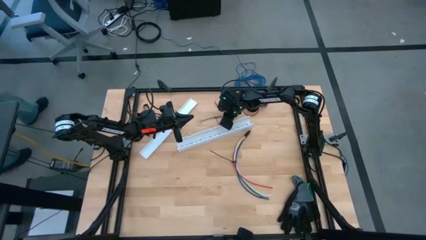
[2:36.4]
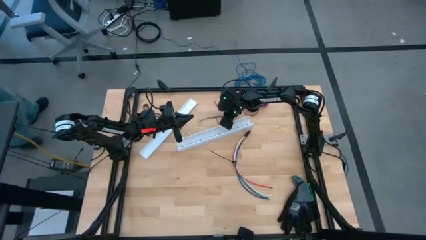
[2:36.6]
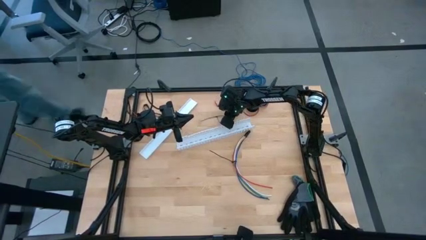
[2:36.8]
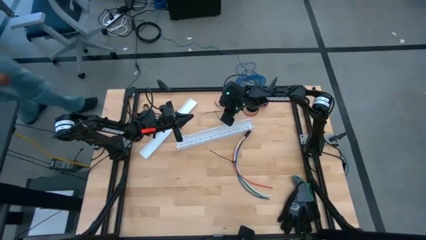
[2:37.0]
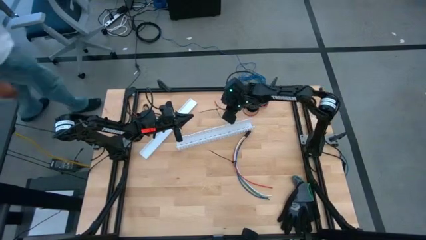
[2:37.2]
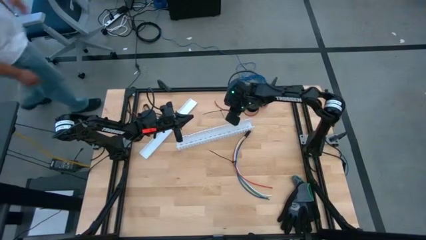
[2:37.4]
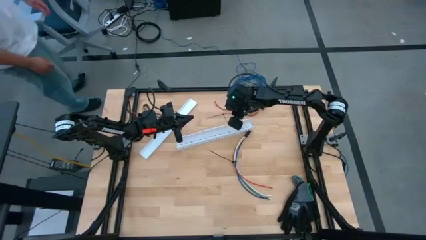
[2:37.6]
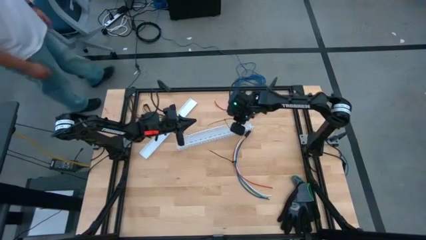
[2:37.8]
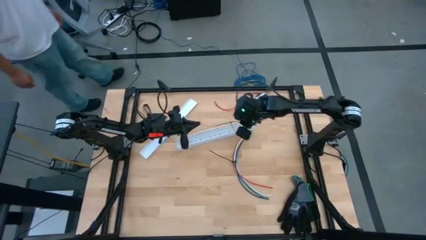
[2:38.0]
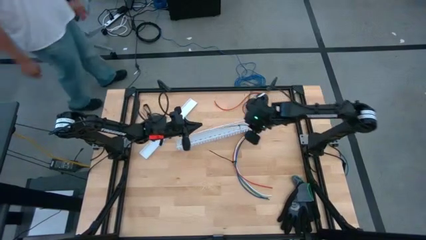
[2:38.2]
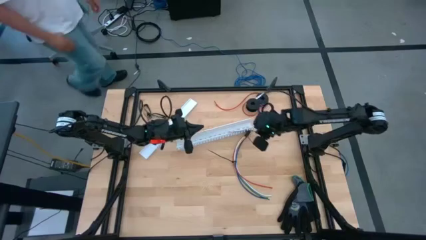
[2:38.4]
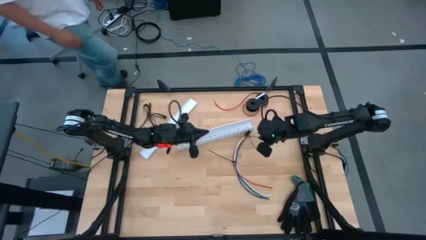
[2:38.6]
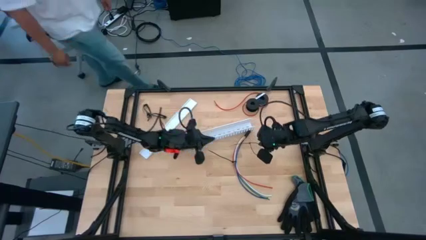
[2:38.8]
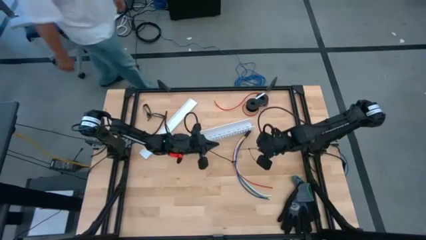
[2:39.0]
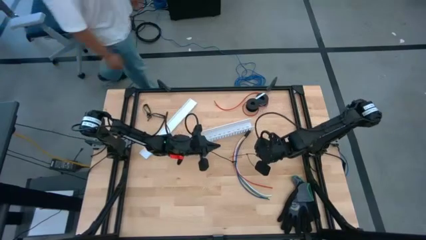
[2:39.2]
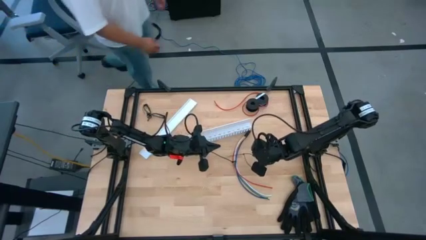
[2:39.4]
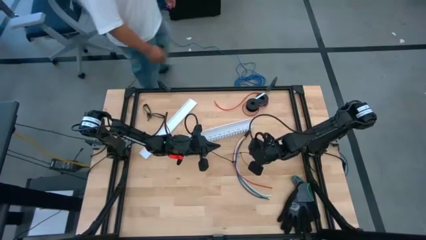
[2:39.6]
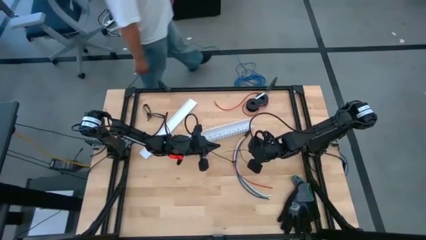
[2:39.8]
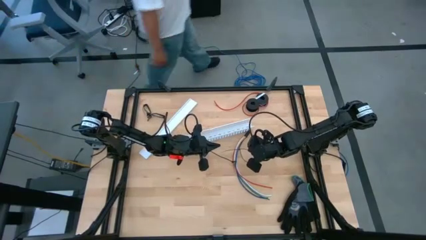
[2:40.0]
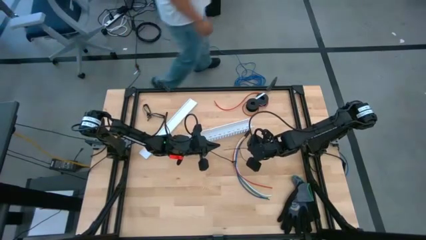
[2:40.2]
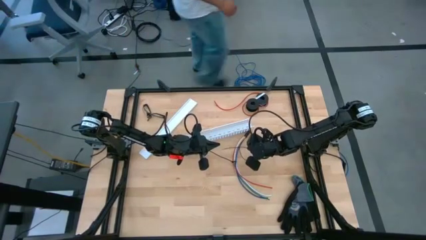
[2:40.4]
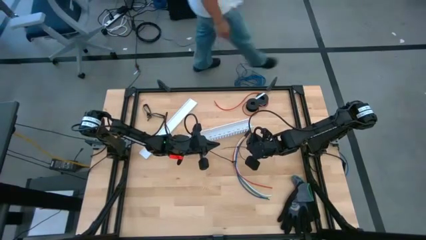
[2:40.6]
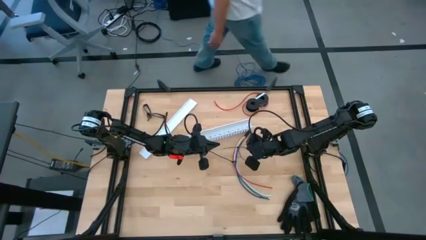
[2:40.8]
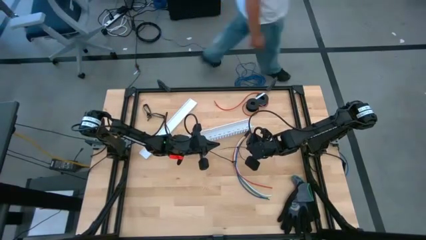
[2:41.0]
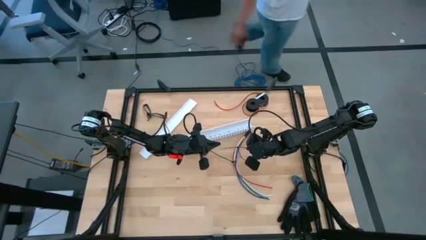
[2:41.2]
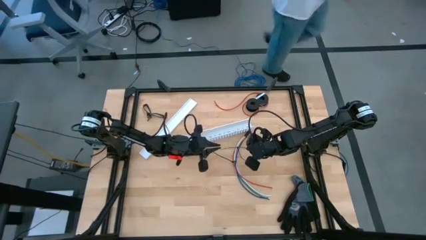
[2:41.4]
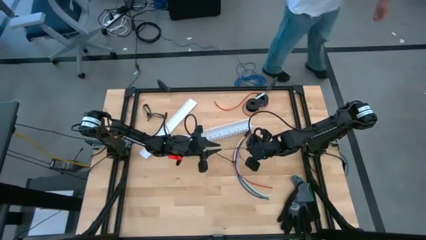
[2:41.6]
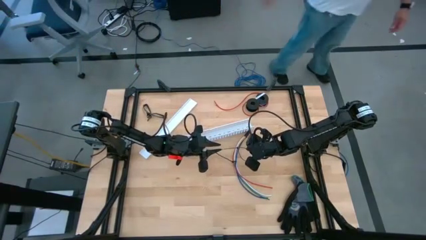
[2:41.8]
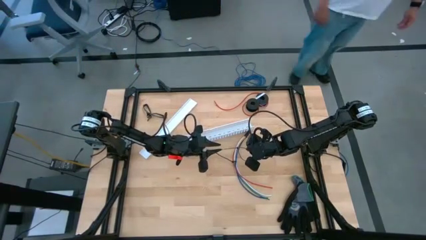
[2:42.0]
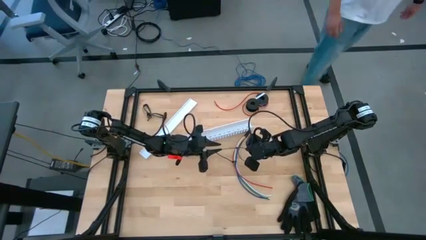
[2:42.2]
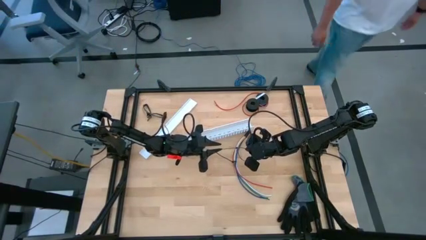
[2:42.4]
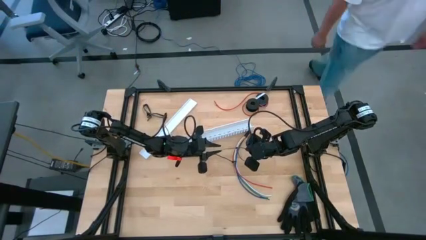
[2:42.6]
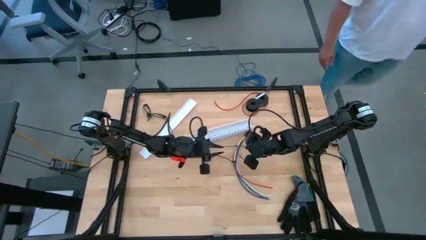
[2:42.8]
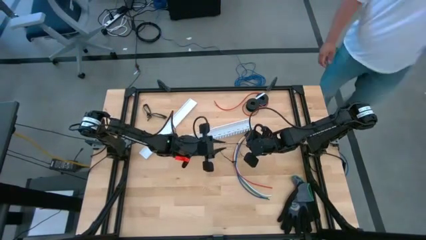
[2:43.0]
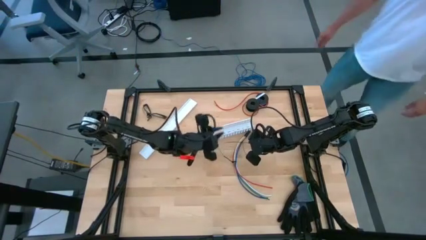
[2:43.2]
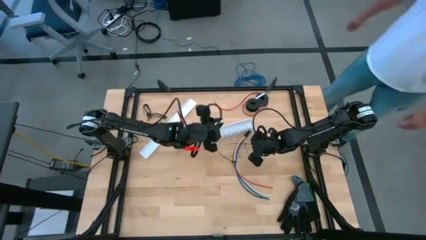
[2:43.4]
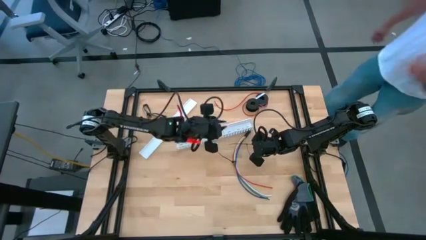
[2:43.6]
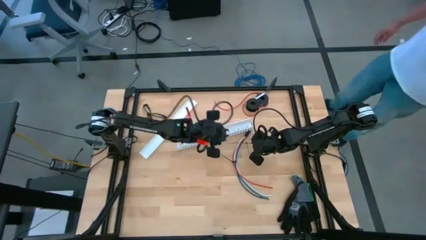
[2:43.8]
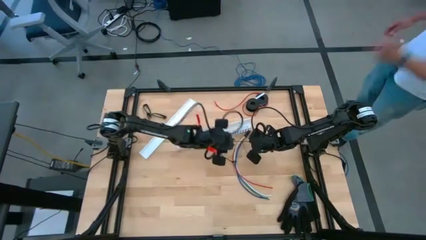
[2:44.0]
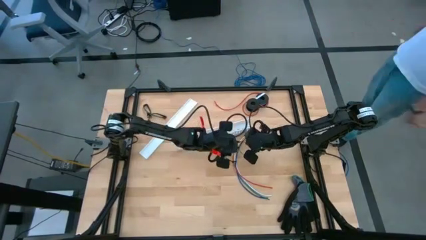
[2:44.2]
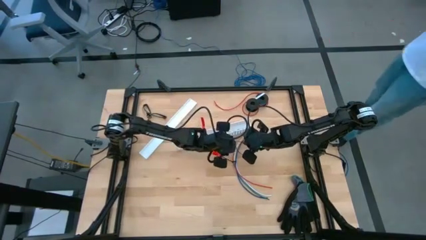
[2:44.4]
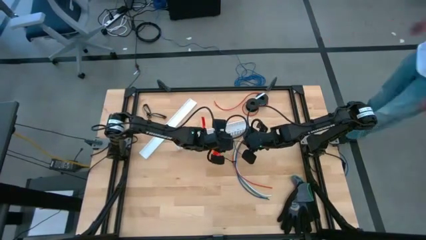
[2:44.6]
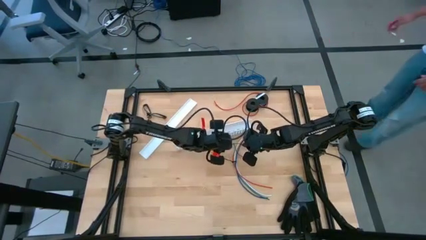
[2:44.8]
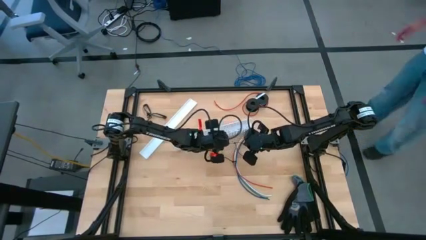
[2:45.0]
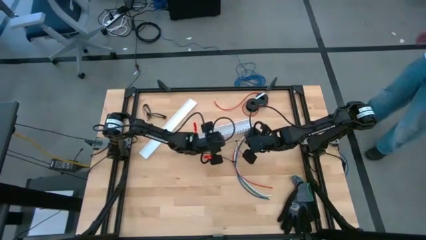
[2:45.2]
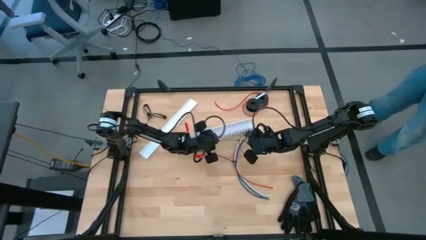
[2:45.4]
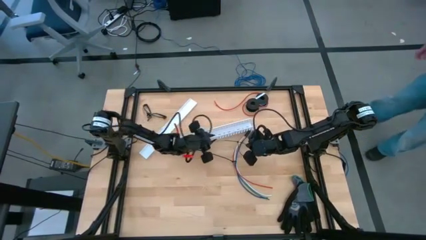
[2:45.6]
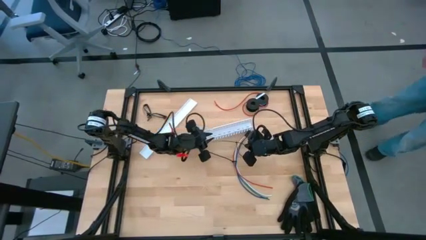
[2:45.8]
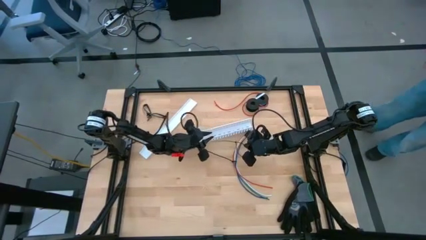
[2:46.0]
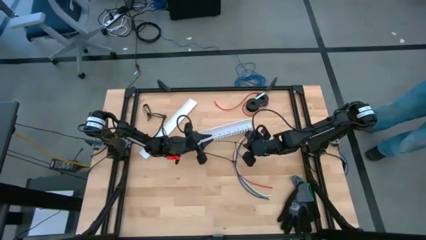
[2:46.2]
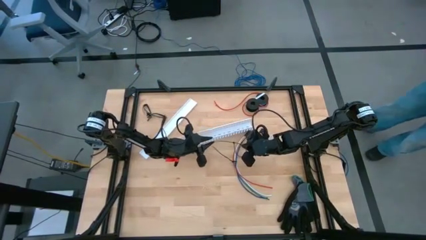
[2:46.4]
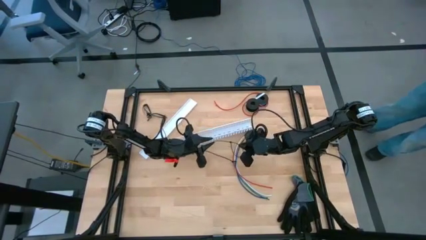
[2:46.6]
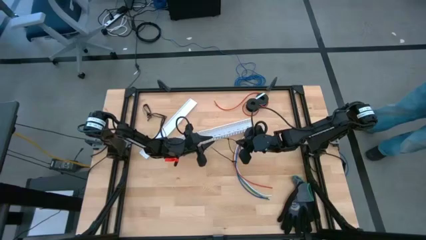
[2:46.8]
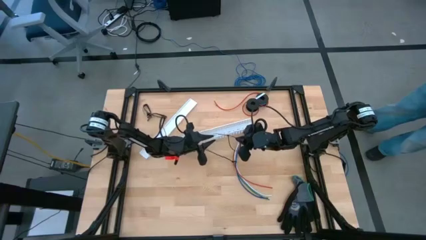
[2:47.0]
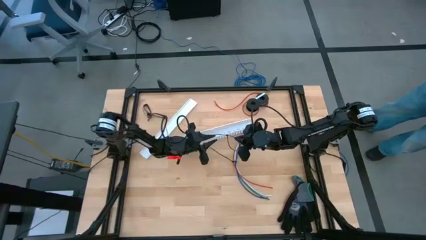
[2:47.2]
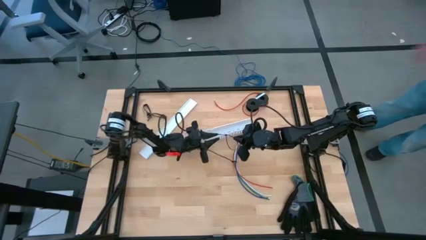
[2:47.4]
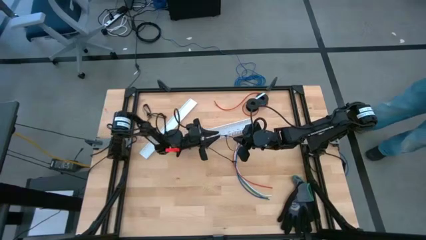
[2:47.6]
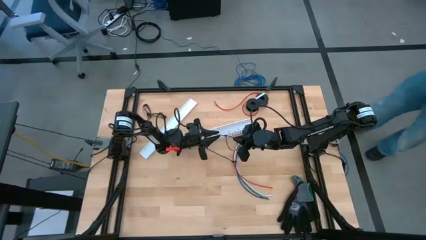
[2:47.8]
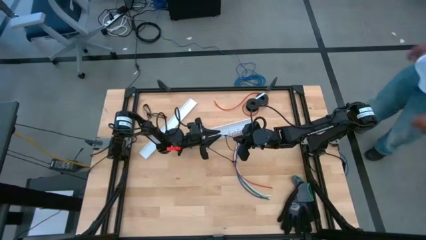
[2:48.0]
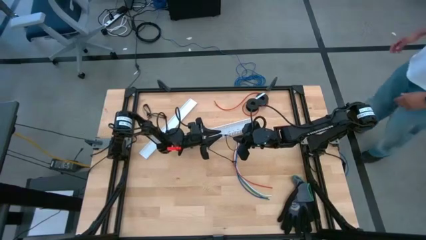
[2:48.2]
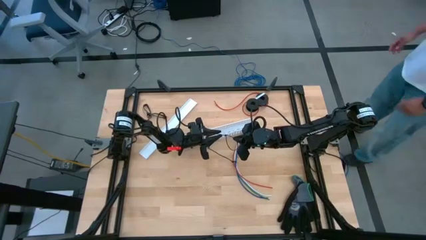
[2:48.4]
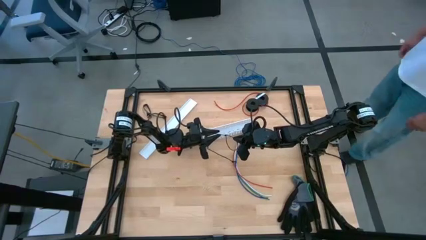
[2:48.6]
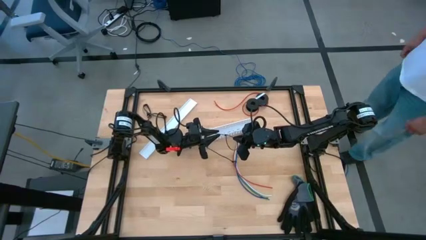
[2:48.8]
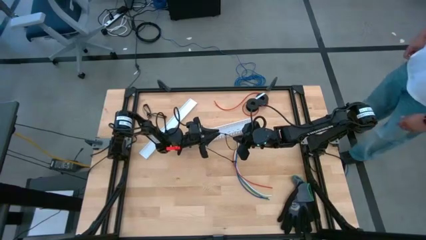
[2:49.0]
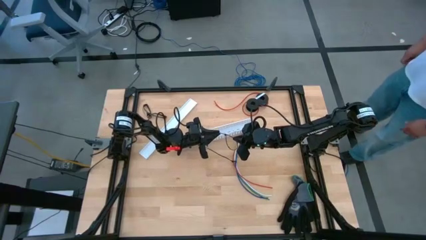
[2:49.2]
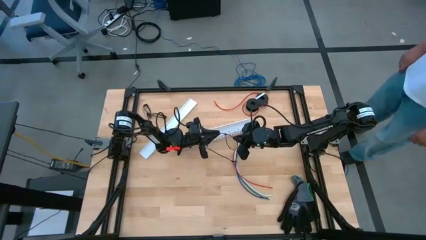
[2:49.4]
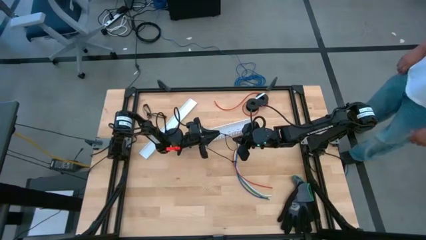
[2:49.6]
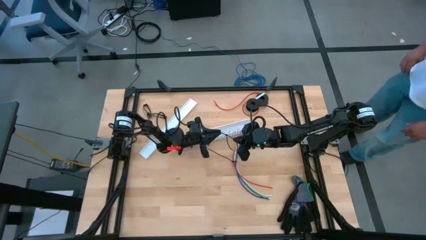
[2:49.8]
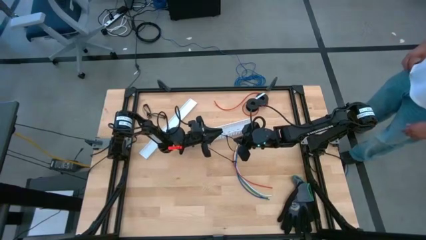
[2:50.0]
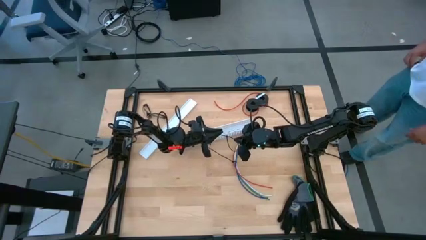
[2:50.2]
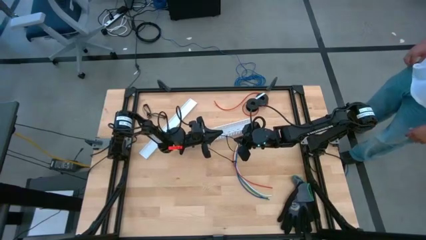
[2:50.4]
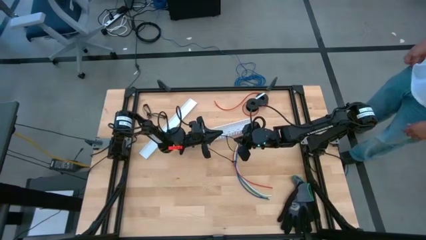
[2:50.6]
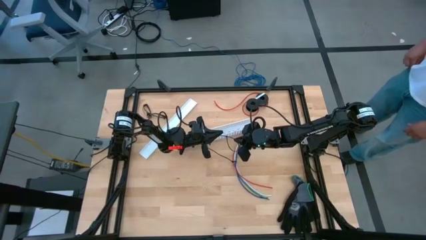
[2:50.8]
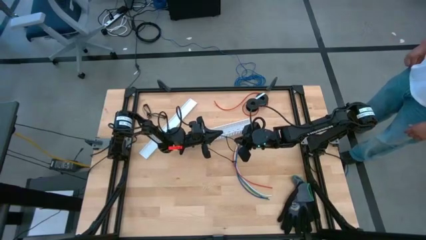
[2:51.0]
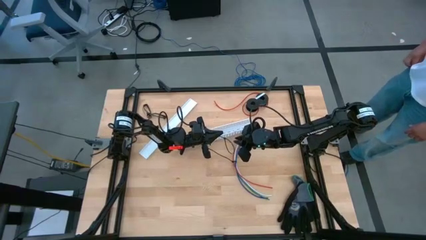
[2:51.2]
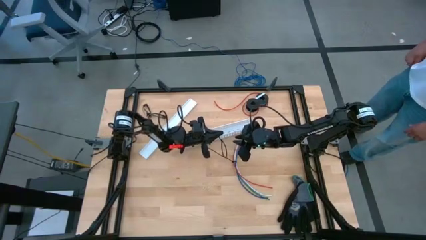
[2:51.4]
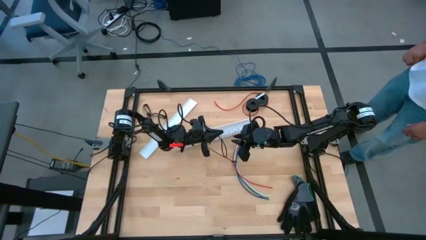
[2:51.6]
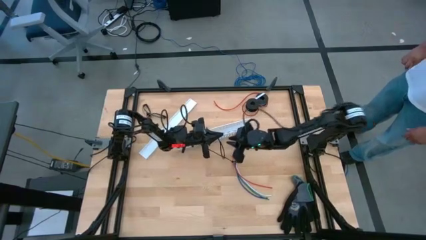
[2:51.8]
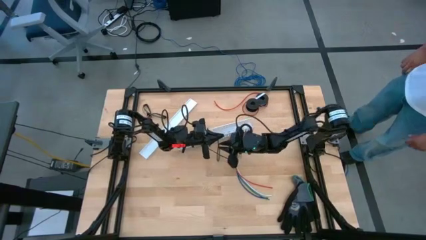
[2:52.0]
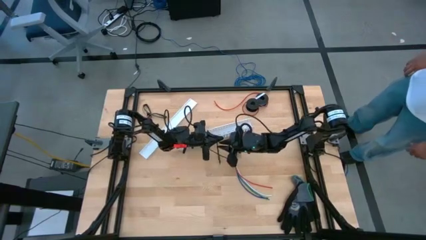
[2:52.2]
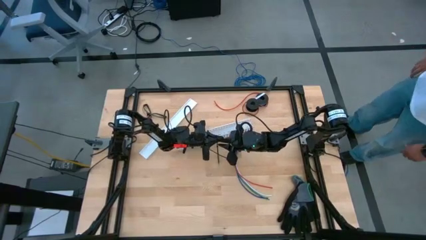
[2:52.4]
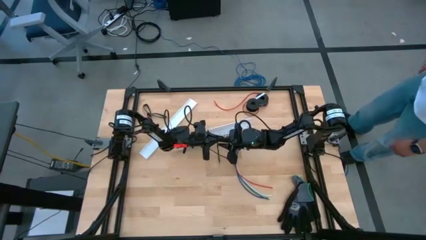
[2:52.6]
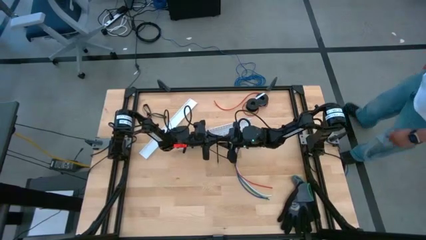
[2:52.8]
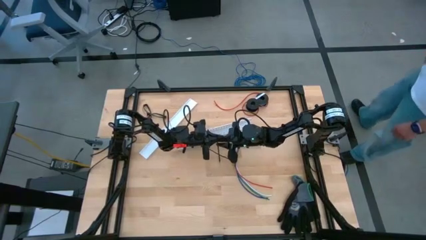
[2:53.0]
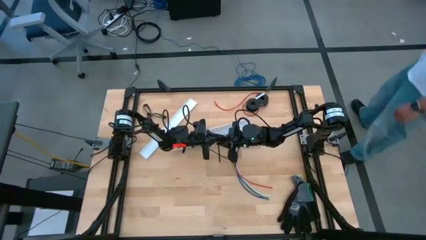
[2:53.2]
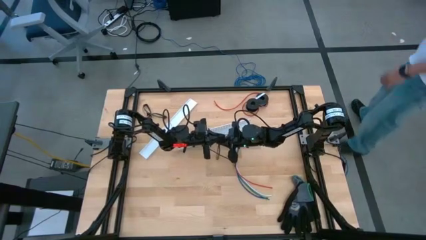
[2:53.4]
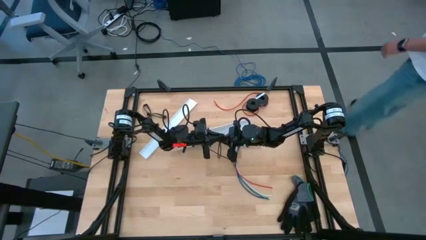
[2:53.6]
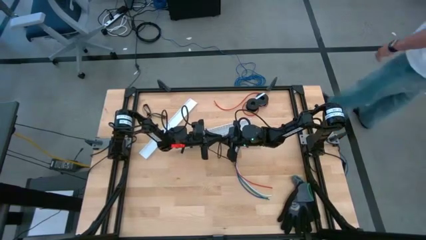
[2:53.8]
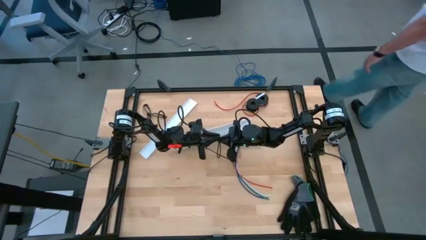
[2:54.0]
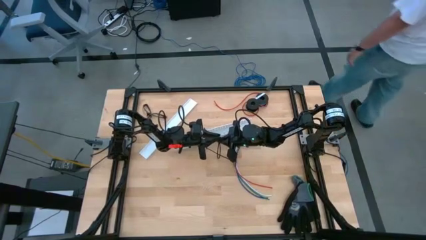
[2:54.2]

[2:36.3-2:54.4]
Task: Ziptie cables
Wrap the cables together using the black zip tie
